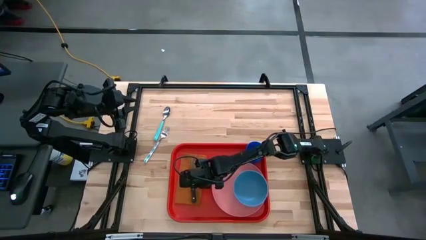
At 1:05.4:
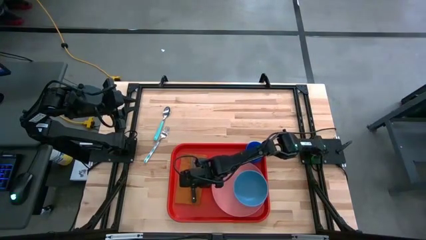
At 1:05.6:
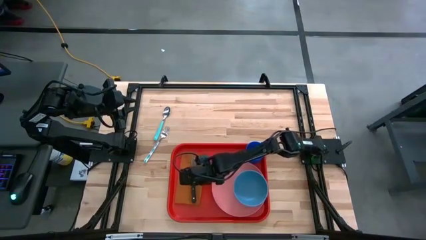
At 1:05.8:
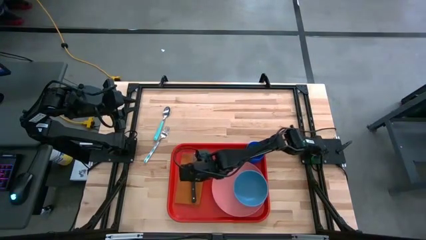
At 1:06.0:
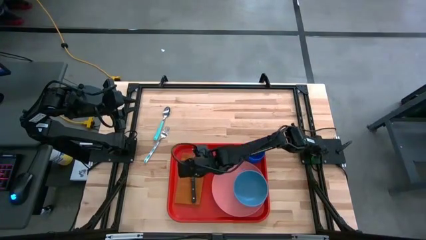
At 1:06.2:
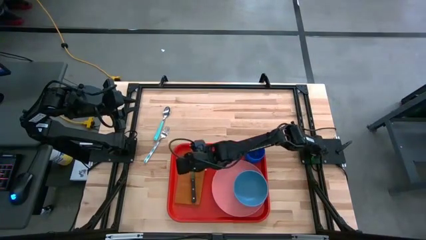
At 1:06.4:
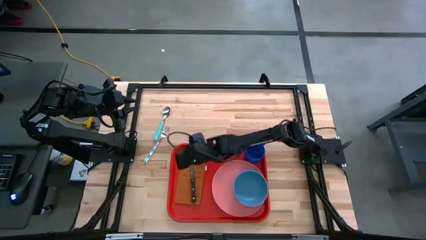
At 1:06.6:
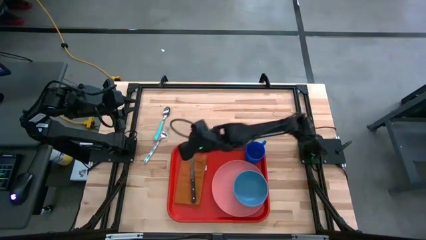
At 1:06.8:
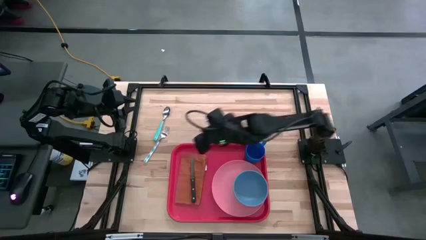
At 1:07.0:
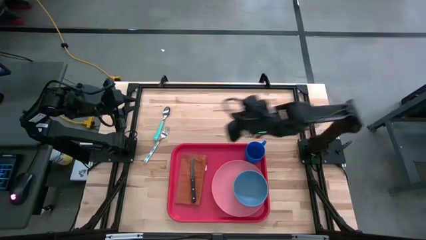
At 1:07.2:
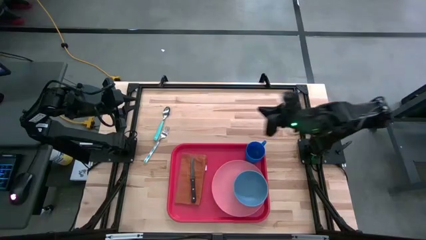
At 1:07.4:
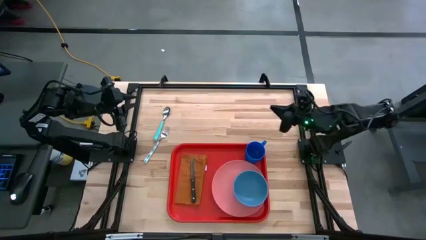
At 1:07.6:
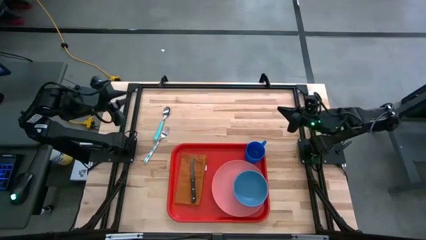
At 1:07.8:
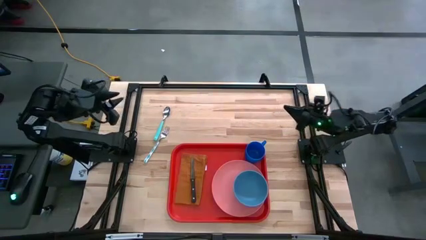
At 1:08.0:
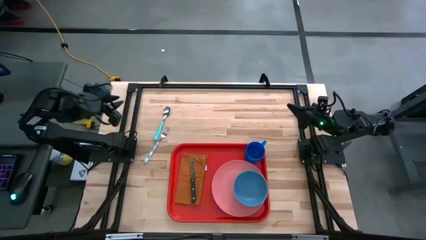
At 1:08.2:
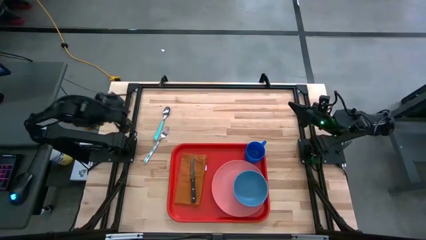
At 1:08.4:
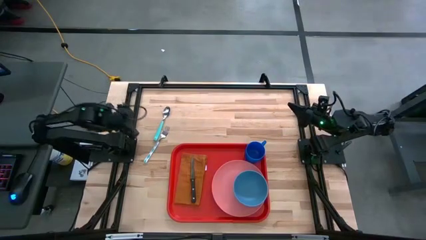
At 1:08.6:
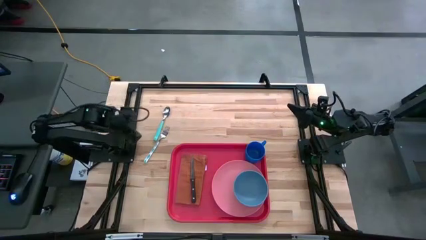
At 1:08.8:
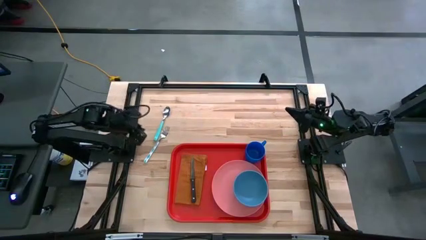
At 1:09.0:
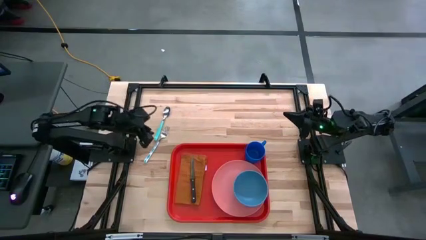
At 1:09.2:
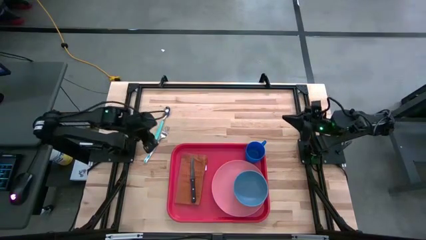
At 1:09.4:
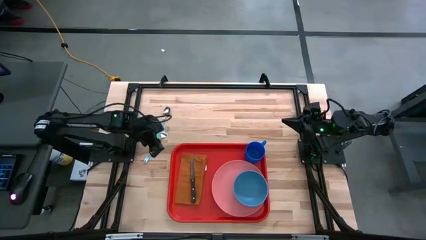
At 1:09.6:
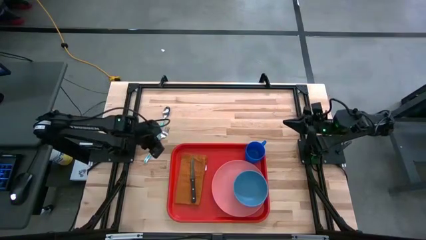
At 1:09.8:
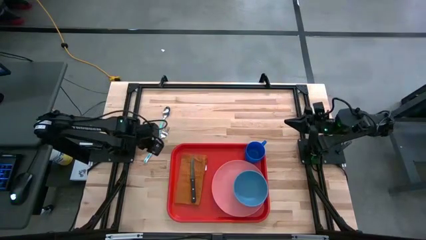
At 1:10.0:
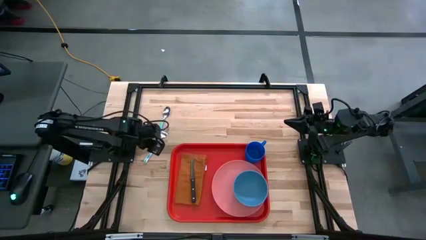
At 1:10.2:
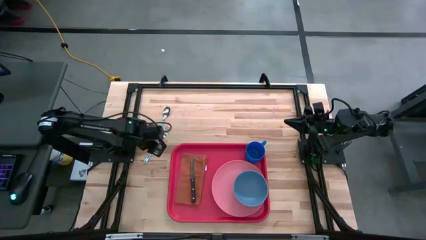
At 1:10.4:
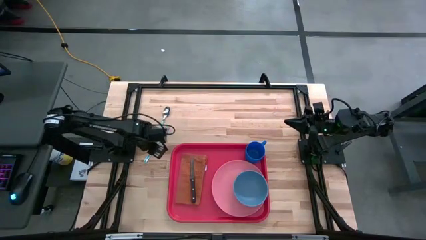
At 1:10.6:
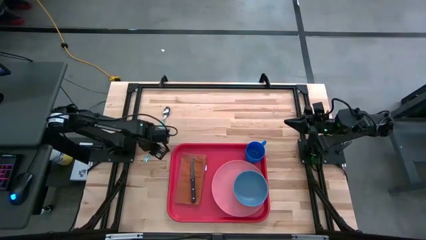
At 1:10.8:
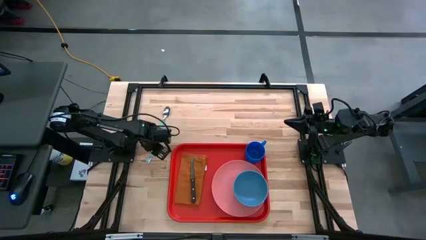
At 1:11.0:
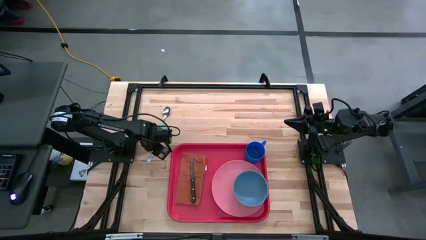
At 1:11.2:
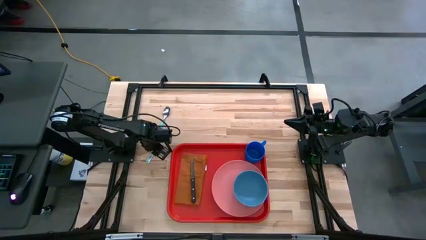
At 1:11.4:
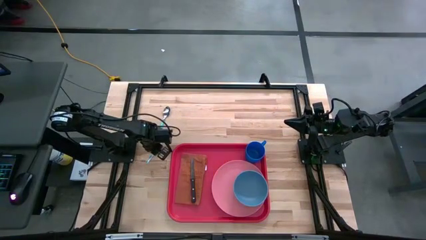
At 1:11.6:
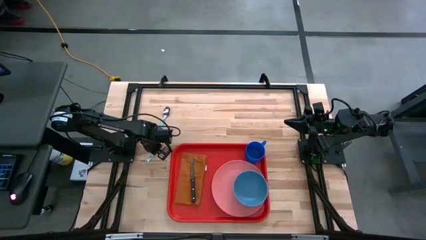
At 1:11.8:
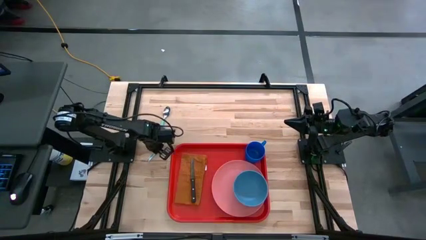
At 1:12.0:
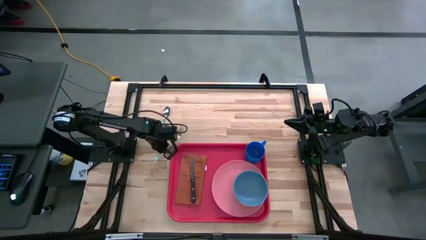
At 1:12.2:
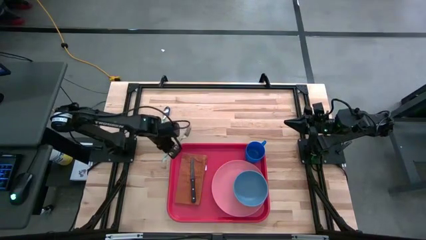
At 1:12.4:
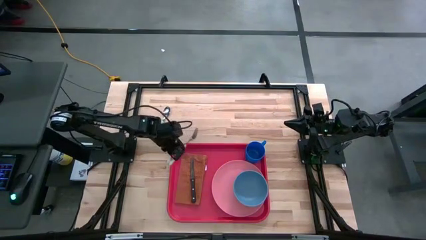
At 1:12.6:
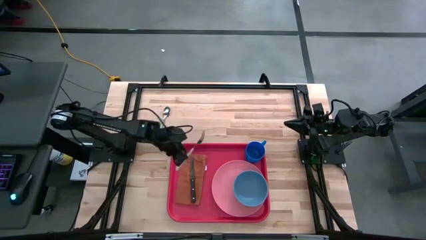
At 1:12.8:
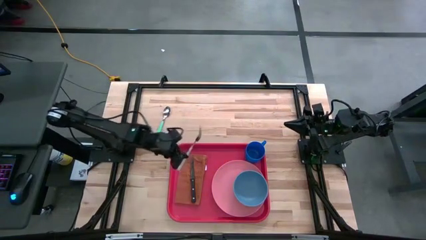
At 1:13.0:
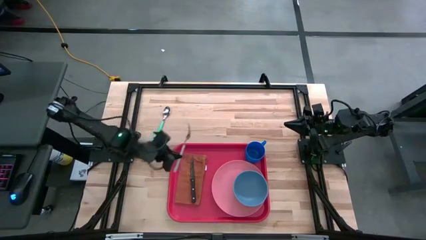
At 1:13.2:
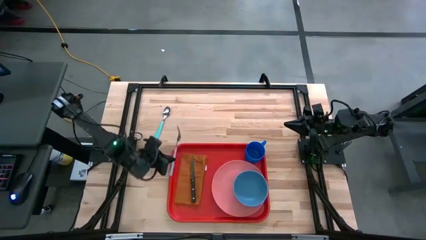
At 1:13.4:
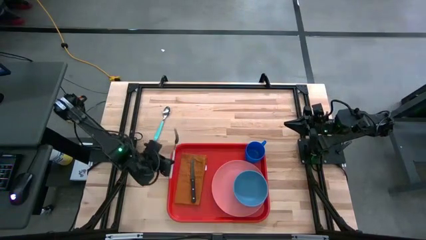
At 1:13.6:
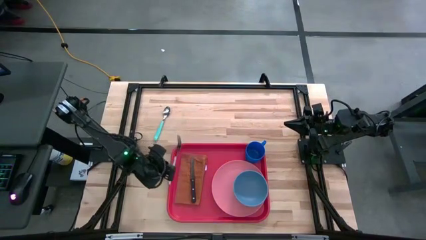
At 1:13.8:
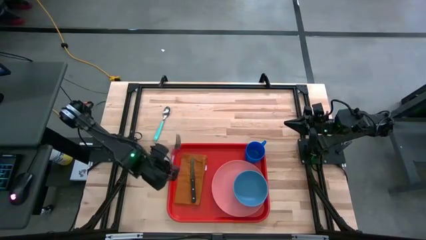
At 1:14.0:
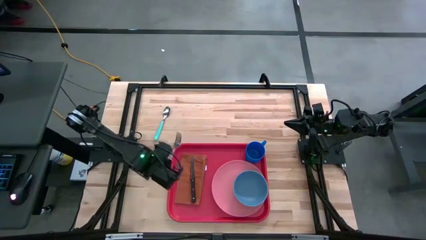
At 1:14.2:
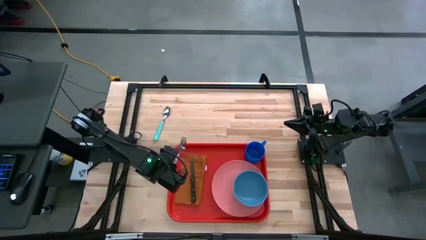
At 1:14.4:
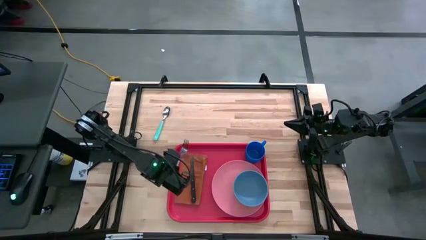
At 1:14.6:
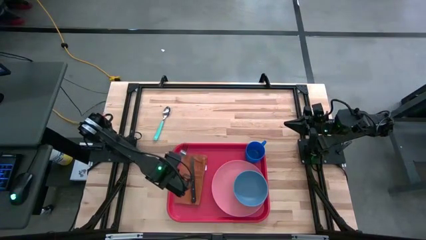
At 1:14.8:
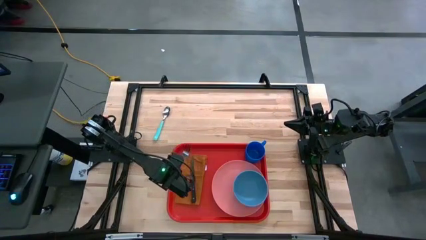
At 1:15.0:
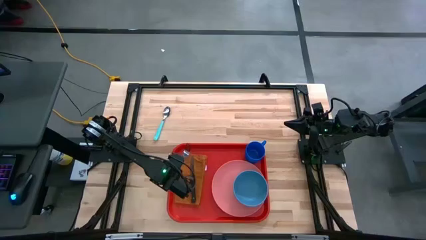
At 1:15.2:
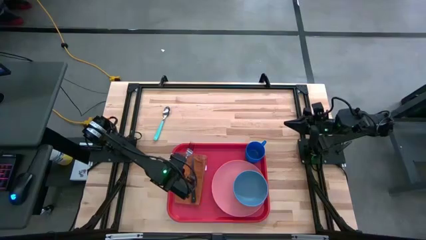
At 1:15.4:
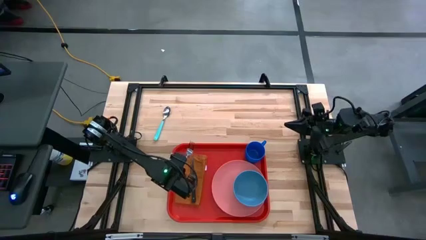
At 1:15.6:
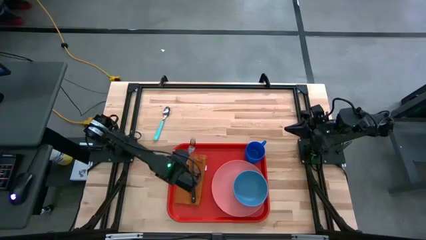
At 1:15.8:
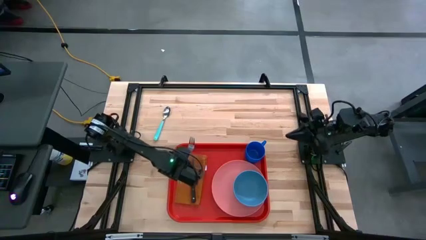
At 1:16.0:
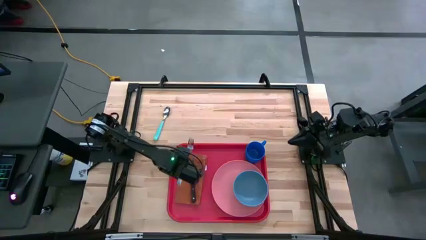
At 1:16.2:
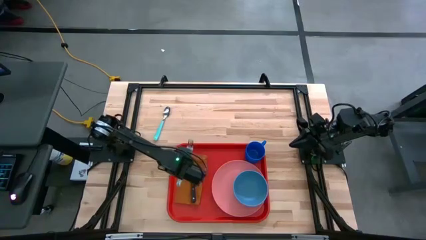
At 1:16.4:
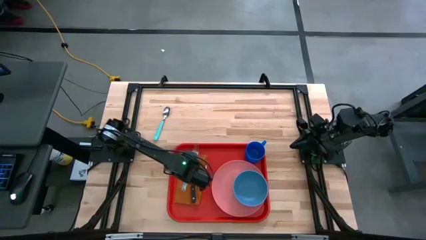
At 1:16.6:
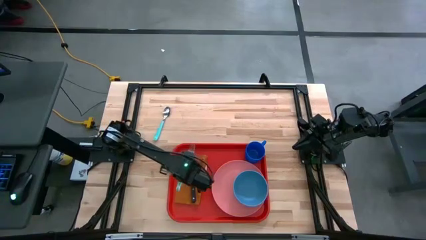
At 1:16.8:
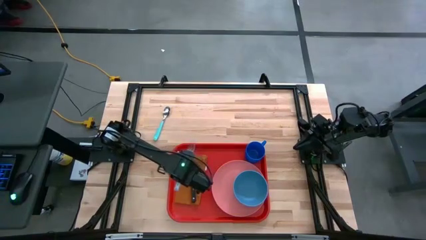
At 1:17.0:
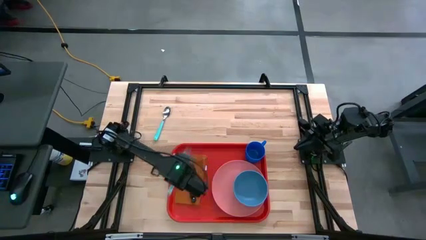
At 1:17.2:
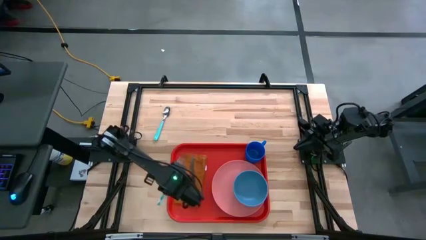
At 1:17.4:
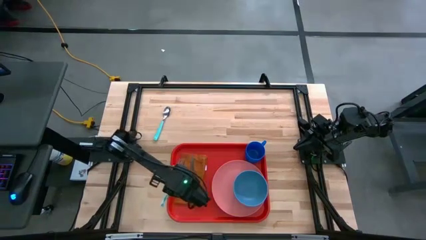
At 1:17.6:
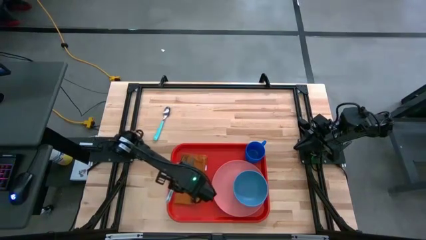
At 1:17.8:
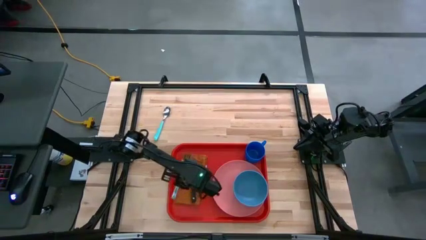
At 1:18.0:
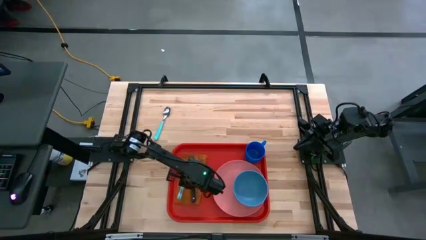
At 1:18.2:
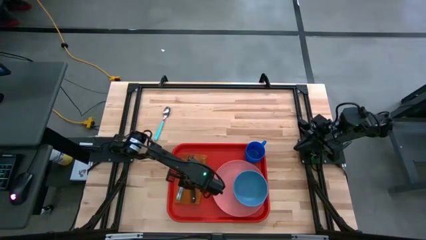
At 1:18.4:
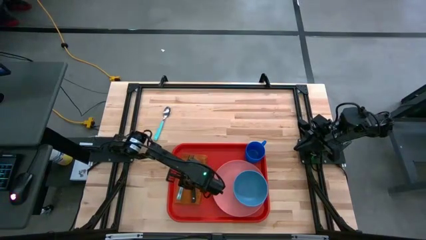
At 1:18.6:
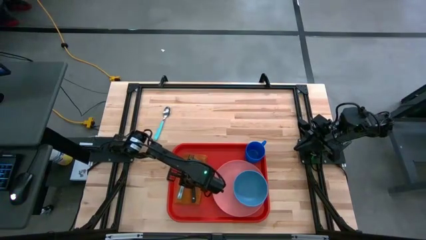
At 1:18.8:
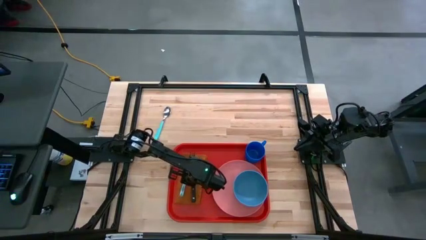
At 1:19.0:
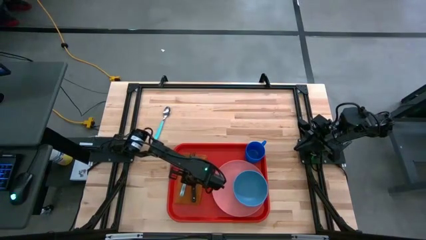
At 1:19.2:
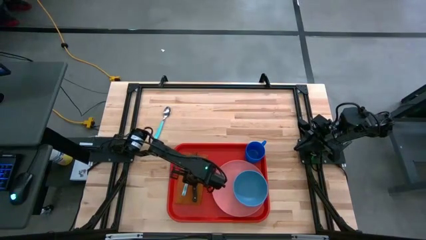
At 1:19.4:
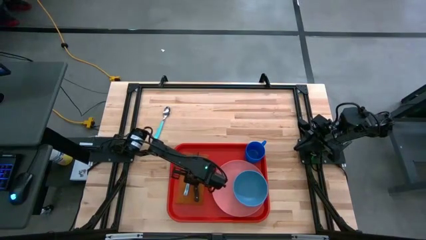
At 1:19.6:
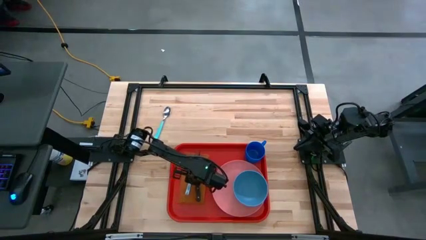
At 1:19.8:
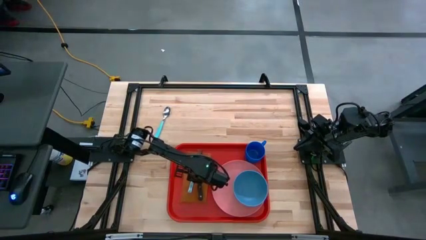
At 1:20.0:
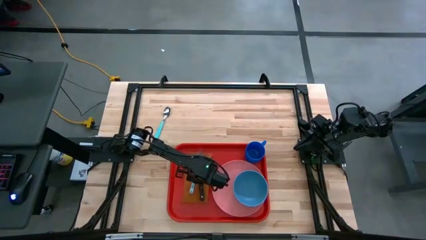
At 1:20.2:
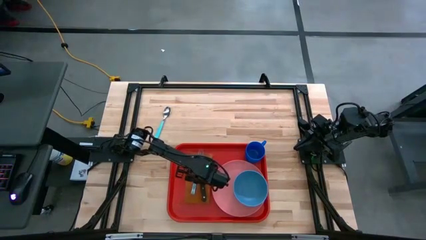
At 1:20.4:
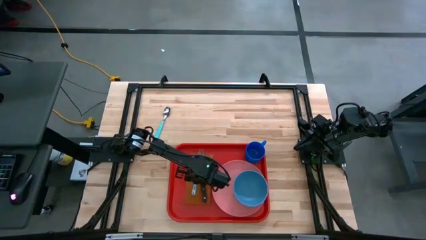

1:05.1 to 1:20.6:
Task: Set up tray
Put the blue patterned fork on the left side of the black bread knife
